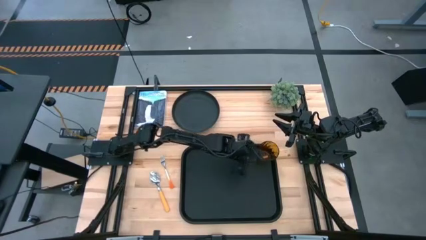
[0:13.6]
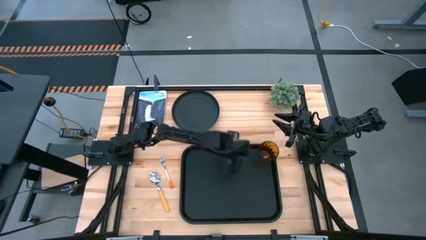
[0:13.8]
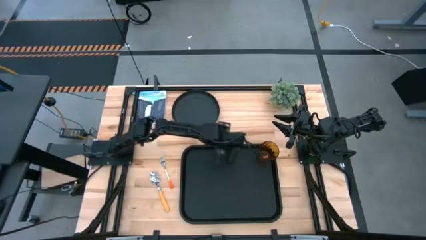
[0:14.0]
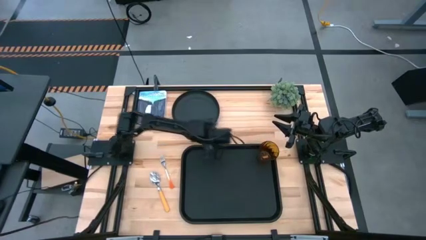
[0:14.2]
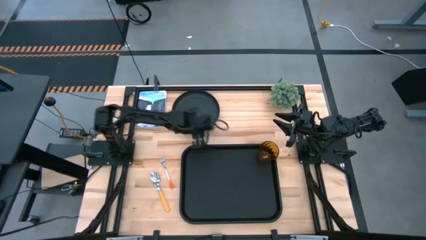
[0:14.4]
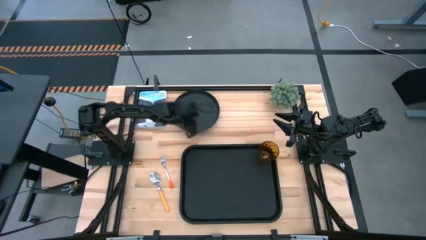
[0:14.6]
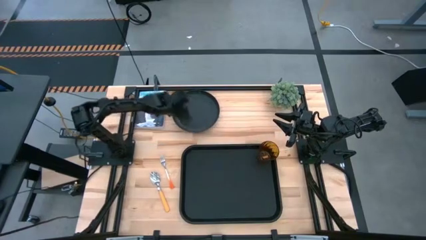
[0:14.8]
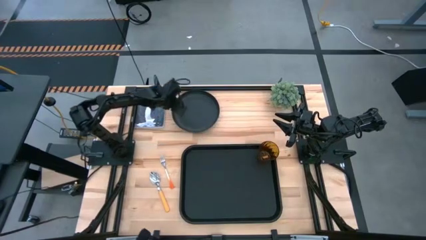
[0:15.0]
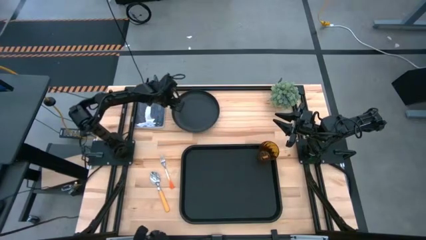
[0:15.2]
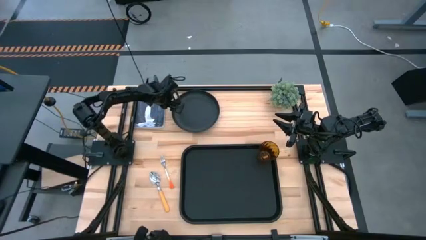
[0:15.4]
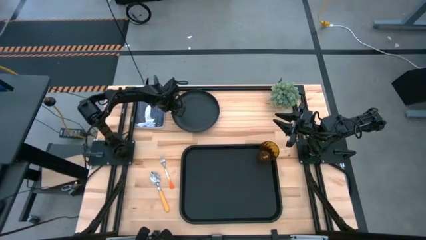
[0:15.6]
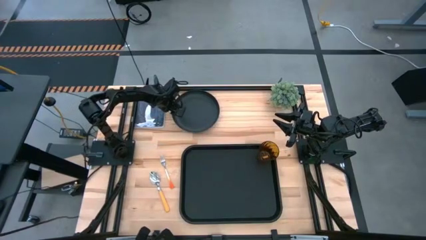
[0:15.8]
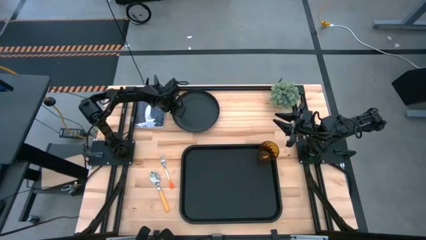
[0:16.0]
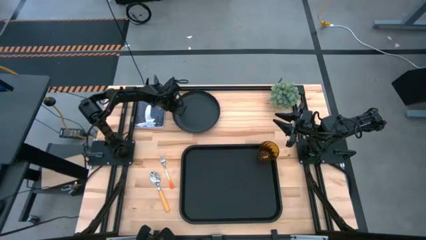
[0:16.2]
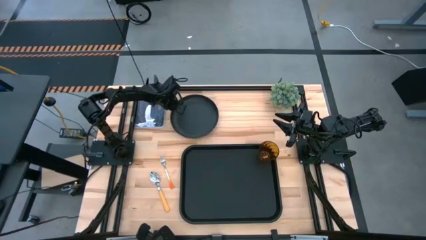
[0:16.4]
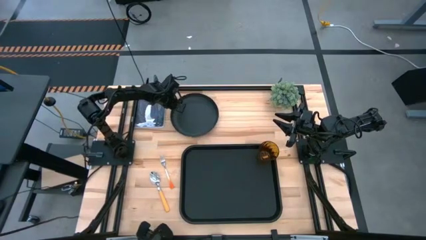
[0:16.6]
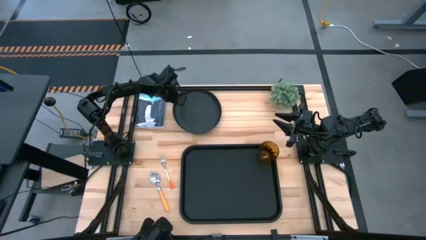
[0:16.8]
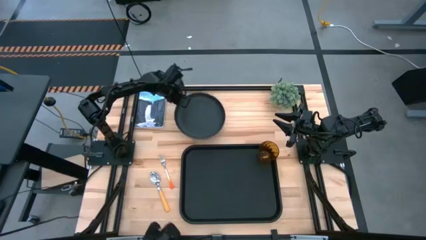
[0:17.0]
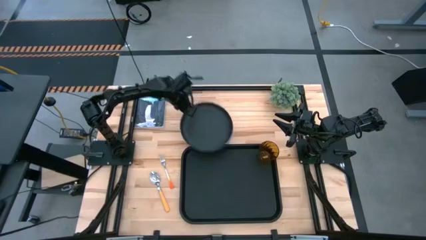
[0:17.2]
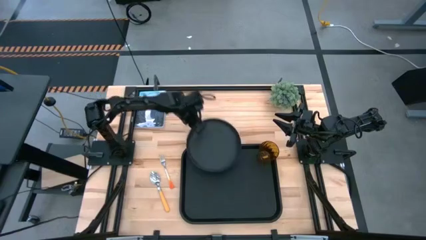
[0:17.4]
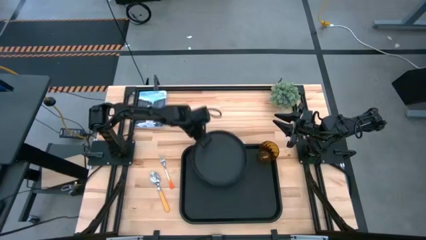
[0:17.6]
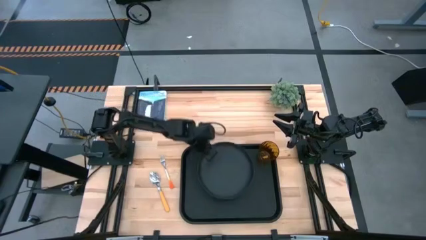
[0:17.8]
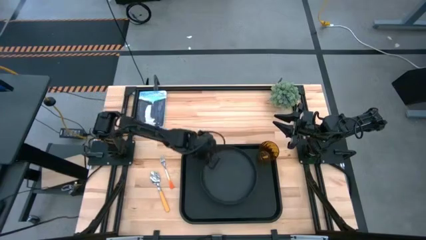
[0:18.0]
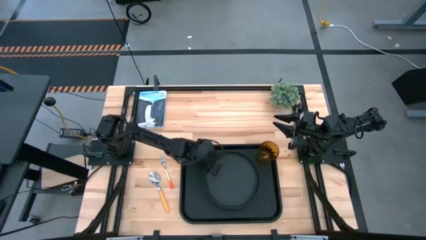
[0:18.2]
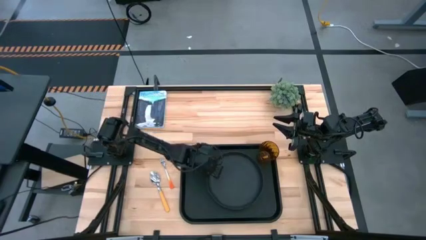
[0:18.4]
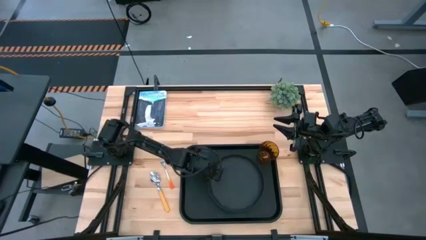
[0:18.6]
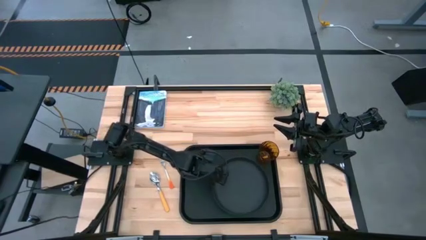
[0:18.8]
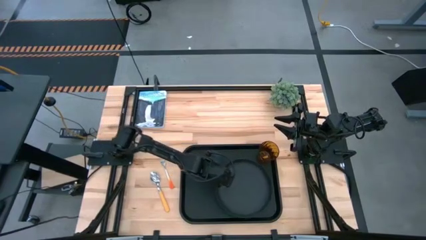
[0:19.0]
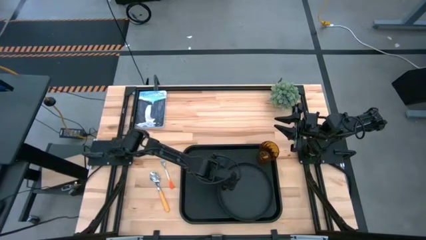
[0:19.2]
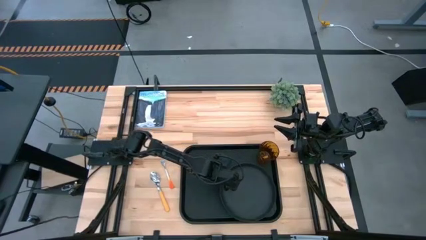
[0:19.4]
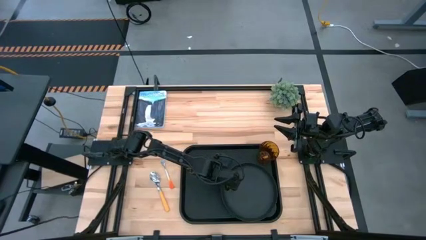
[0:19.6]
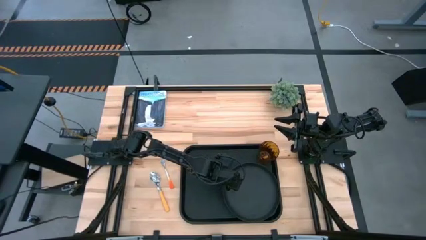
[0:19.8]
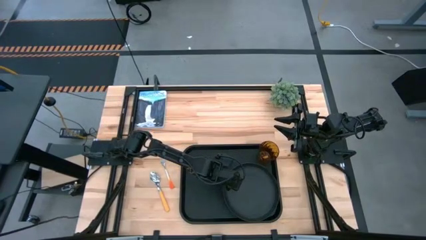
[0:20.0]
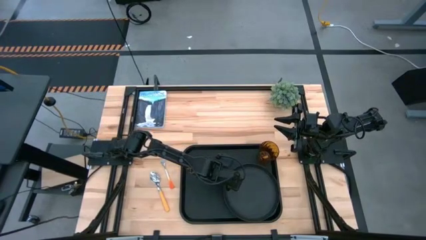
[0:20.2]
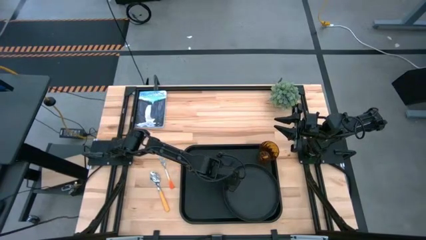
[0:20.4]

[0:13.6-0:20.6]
Task: Pick and place plate/cup/fork/spoon on tray
Put the black plate on the bottom right of the black serving tray

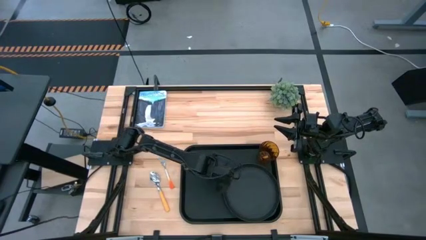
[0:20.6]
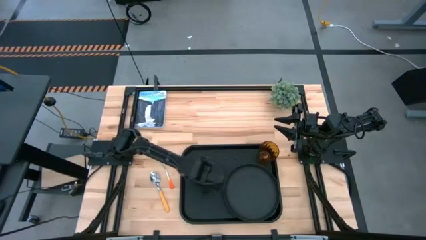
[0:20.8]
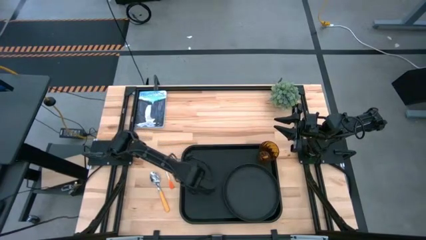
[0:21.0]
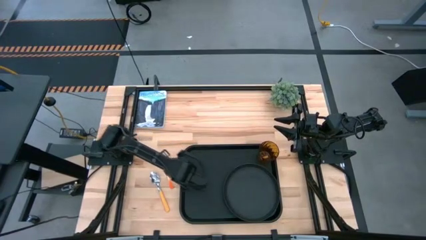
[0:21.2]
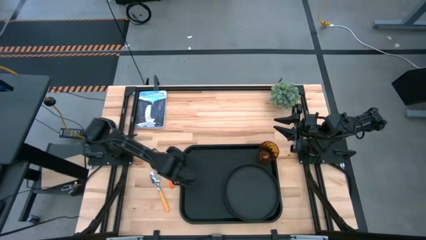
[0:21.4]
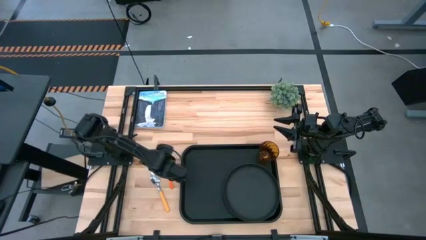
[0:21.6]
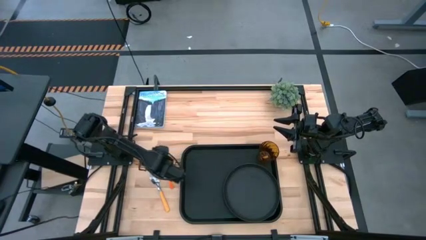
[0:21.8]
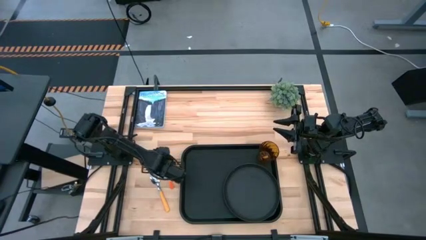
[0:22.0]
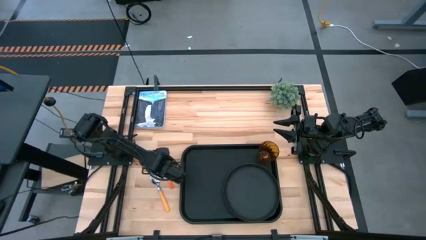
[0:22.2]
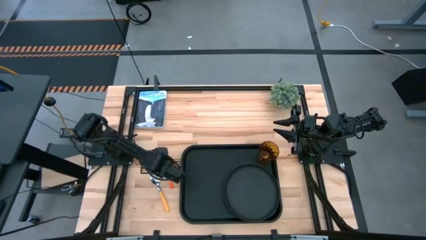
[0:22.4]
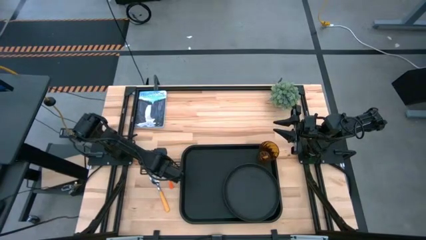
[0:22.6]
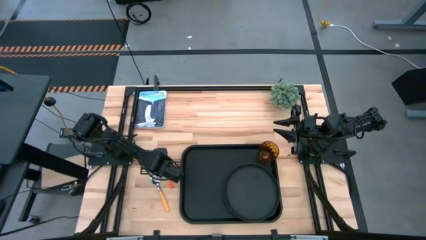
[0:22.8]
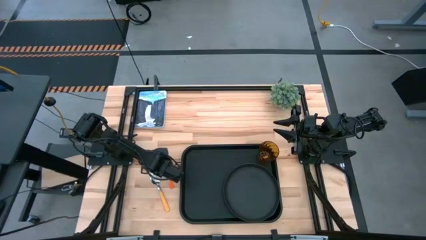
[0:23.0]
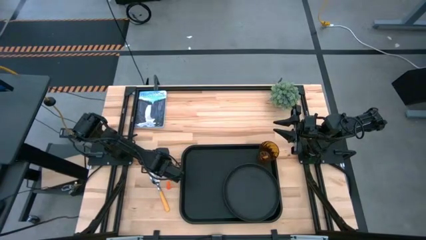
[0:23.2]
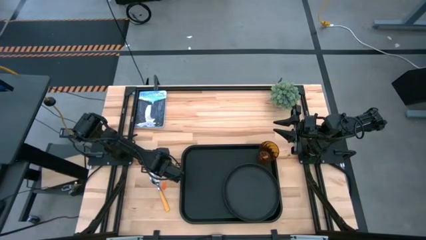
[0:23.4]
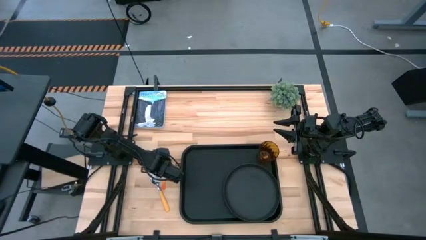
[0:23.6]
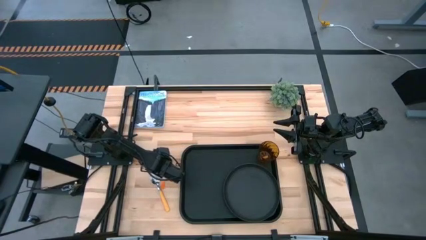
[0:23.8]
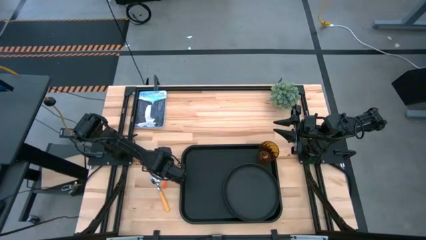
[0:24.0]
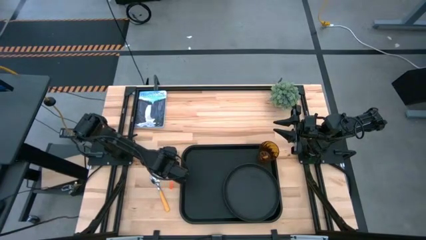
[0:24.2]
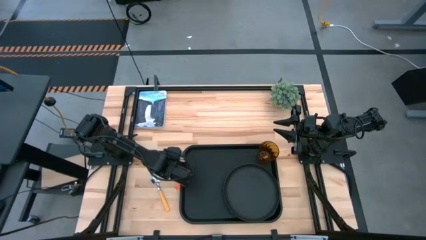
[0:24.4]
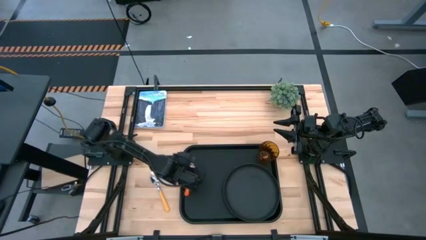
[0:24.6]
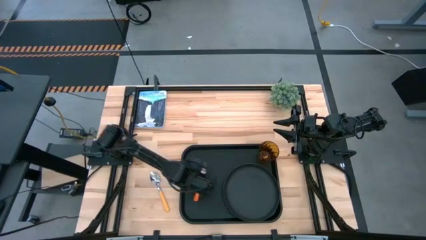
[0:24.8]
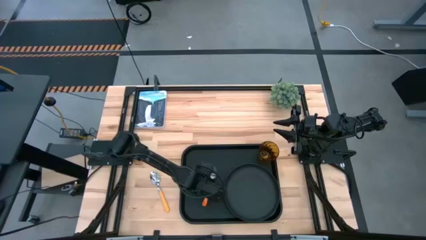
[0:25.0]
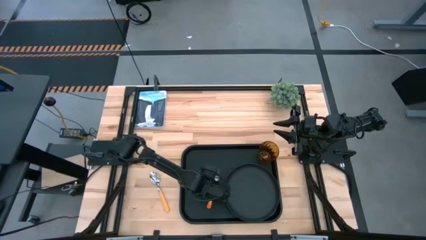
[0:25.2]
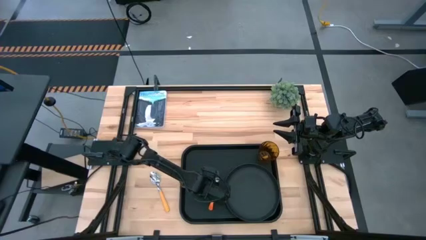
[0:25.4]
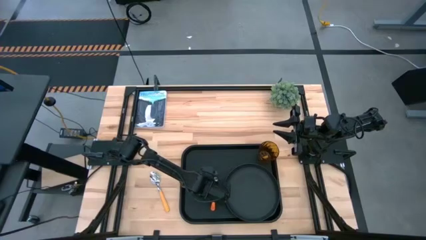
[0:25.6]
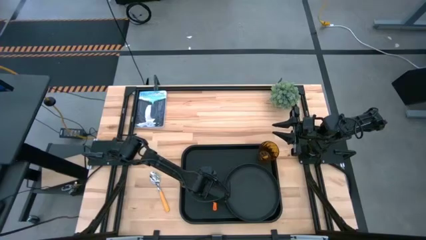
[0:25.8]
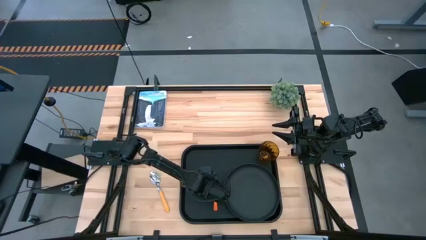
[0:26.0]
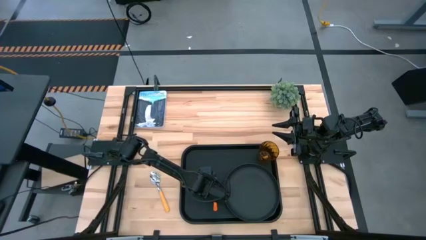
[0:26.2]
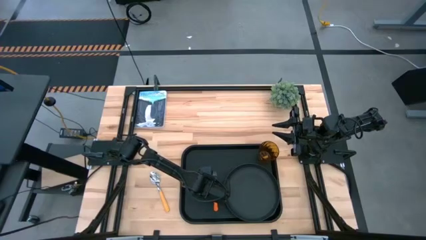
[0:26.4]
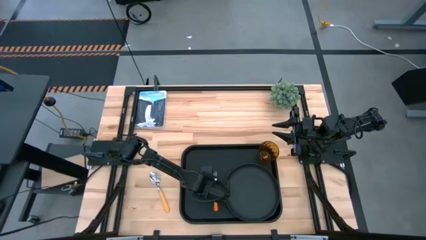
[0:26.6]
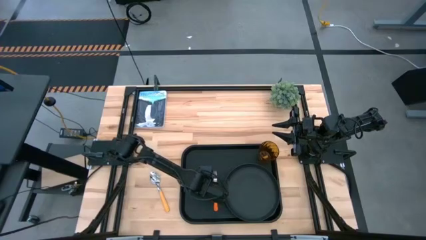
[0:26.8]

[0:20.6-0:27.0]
Put the orange fork to the left side of the black plate on the black serving tray

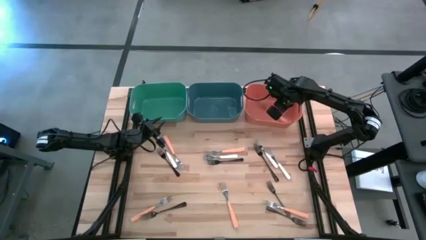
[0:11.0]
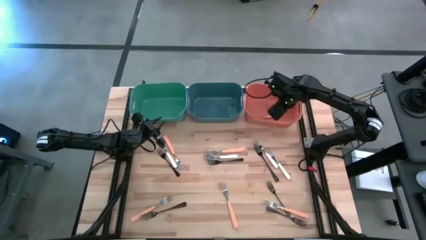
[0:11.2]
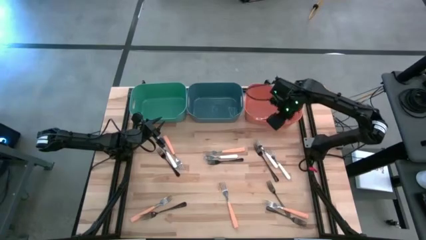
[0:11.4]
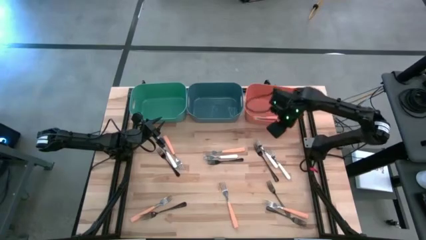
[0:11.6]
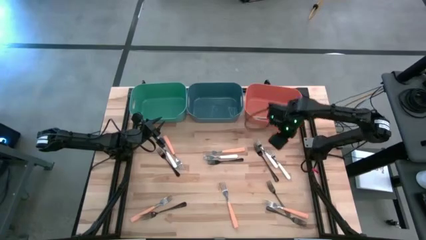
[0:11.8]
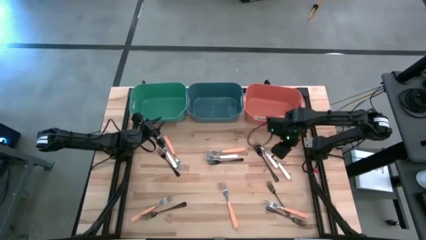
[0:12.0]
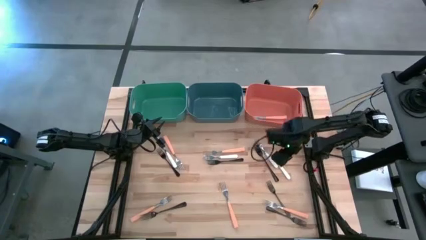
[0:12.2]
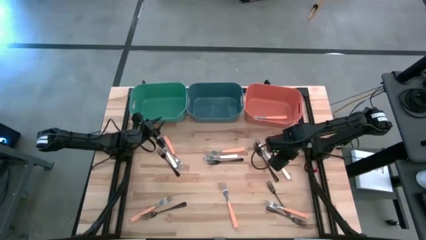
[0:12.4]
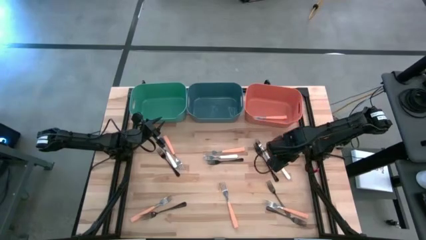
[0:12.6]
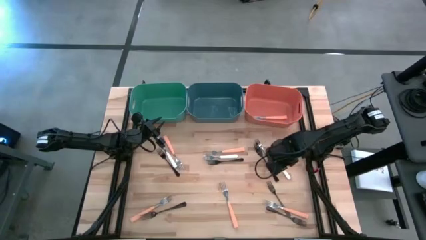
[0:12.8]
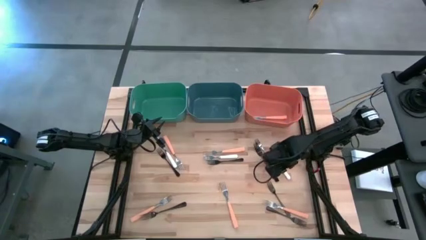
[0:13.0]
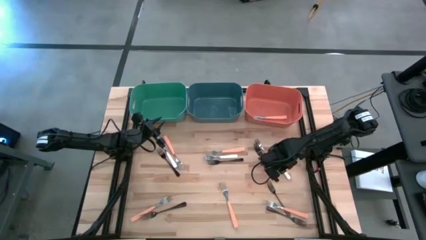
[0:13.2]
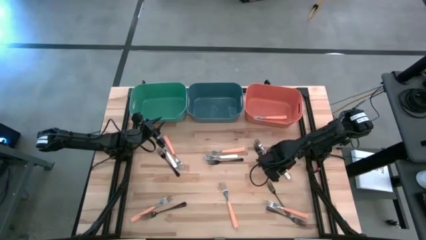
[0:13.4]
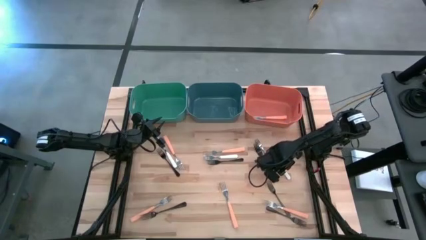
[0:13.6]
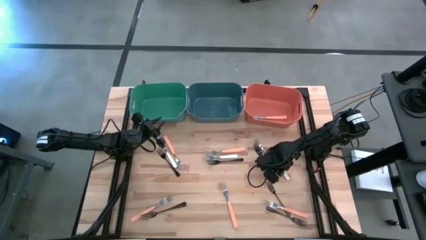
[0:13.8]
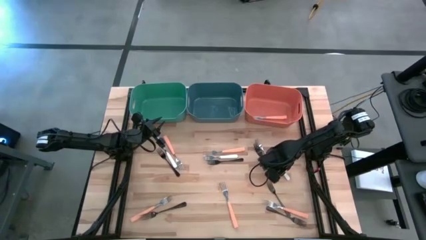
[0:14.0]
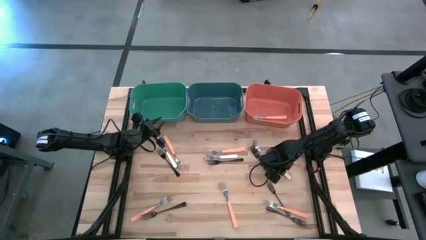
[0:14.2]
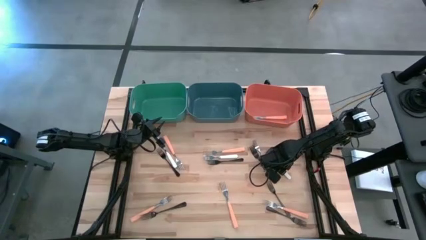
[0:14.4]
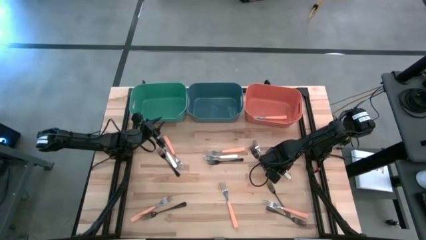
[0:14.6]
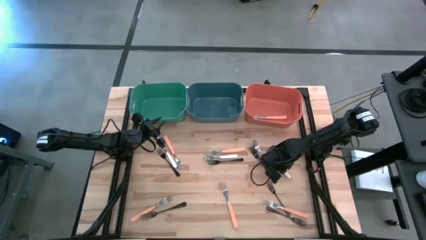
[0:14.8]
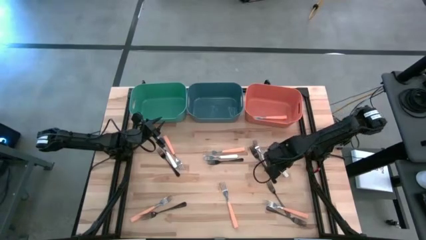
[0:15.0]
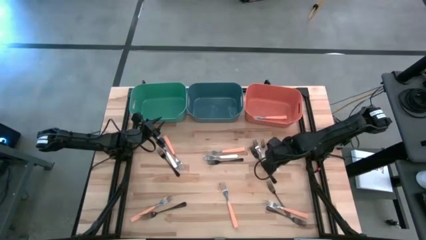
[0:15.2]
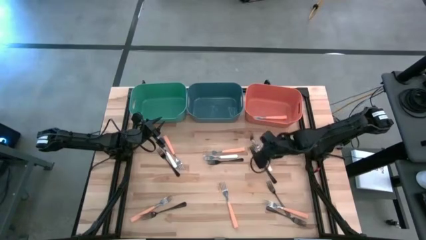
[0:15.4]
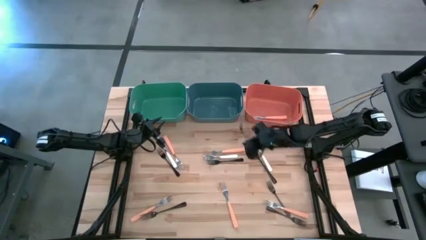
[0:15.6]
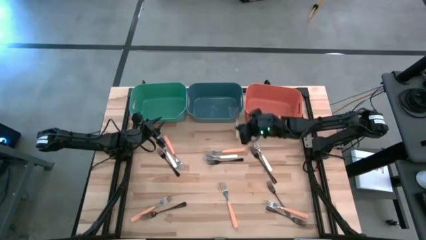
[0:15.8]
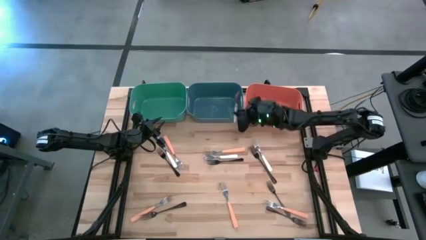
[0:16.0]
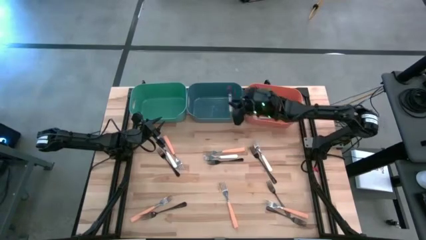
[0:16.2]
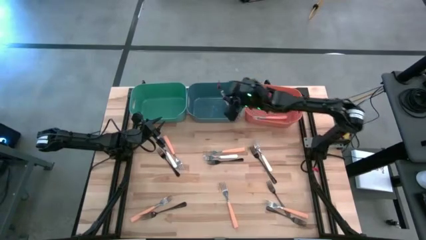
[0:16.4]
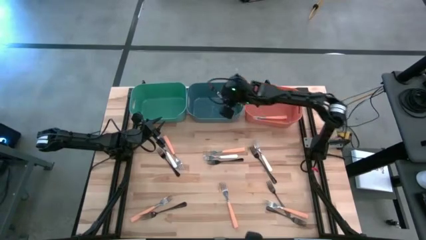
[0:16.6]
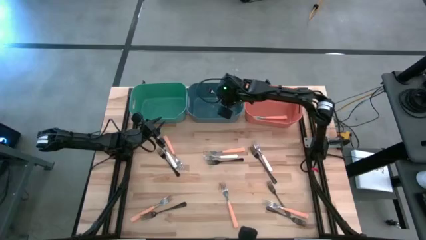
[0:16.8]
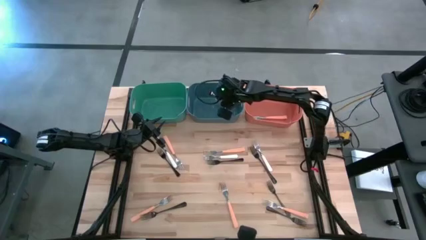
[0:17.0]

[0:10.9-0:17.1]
Task: Sort silverware by color (type)
Put the white fork into the blue bin
